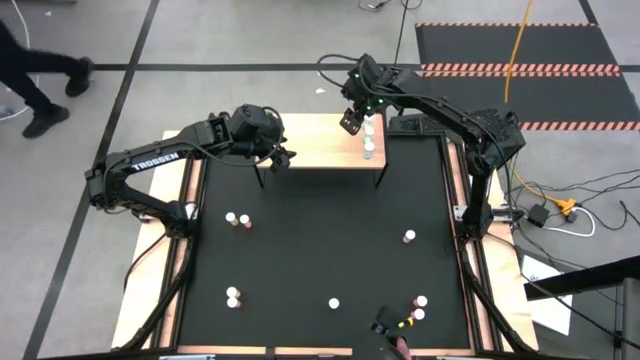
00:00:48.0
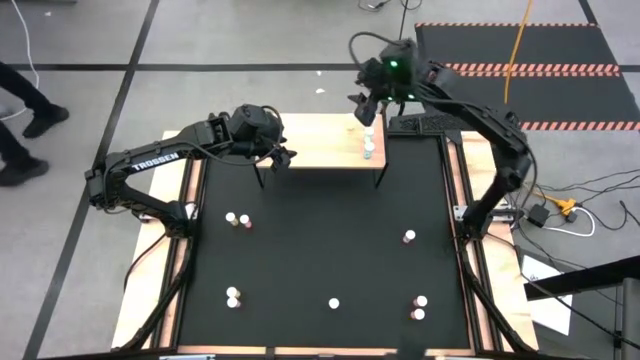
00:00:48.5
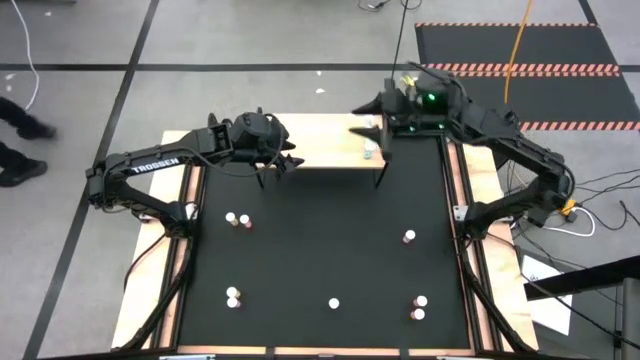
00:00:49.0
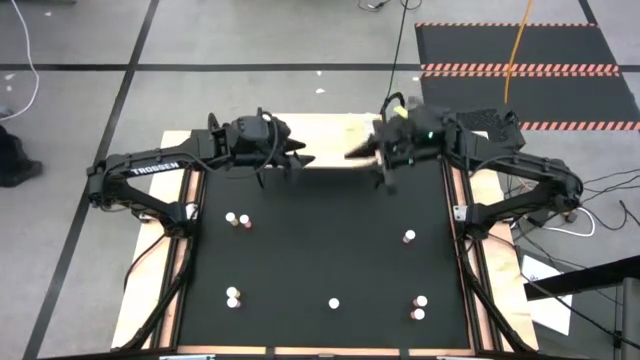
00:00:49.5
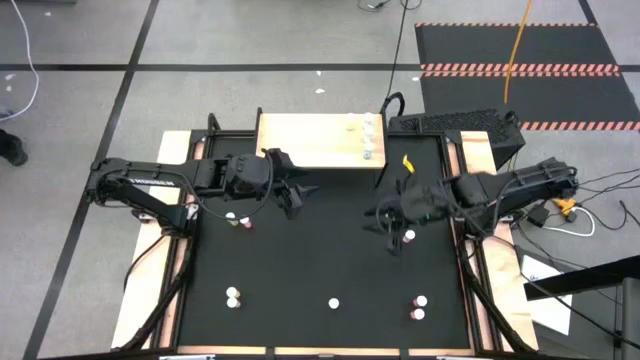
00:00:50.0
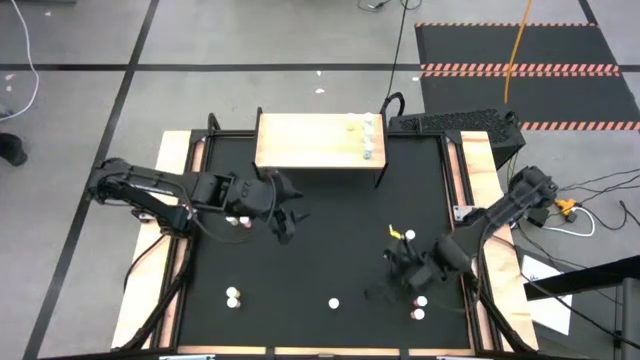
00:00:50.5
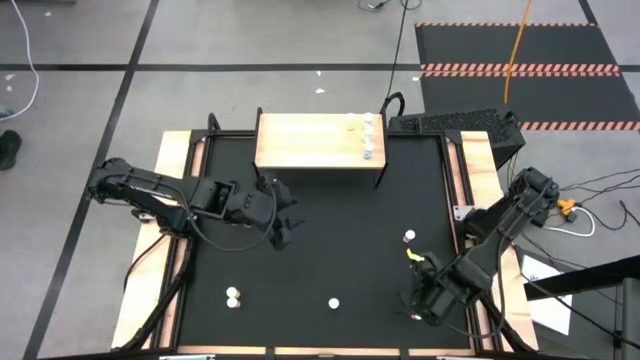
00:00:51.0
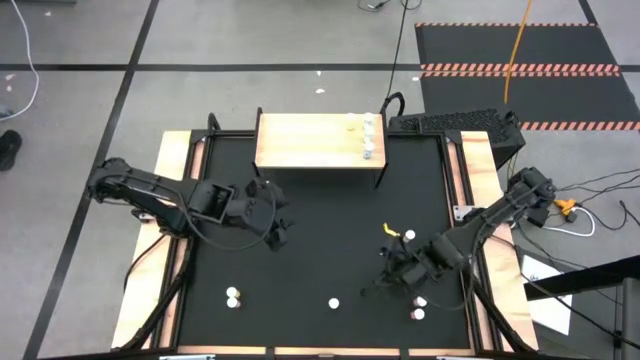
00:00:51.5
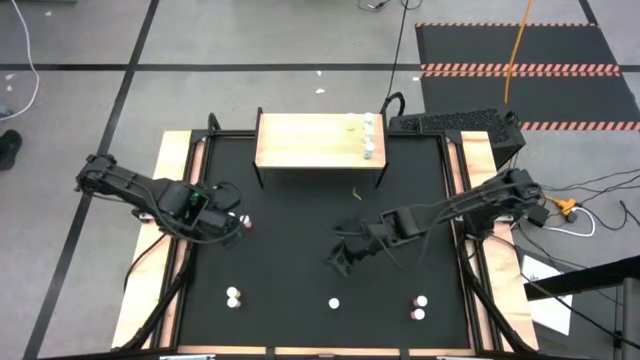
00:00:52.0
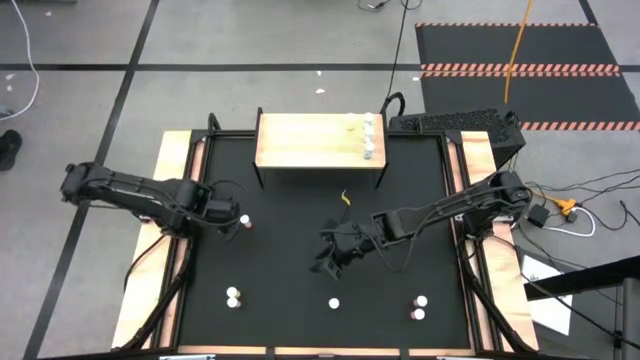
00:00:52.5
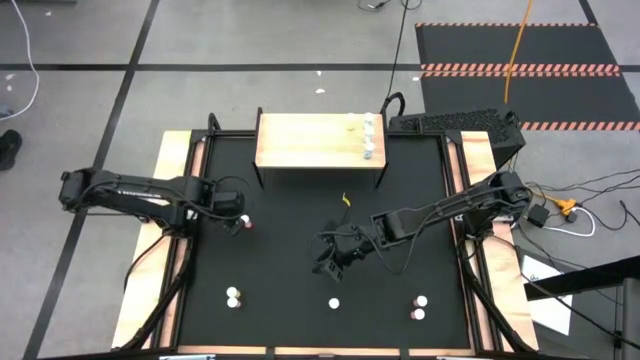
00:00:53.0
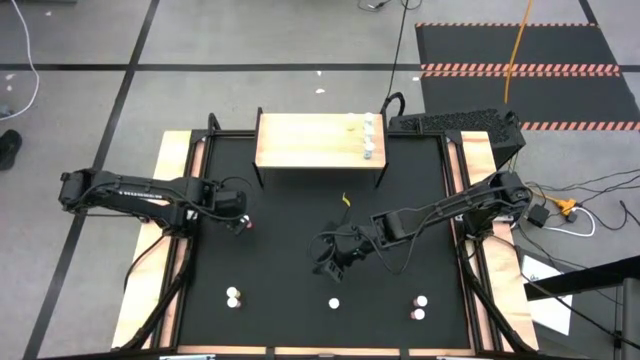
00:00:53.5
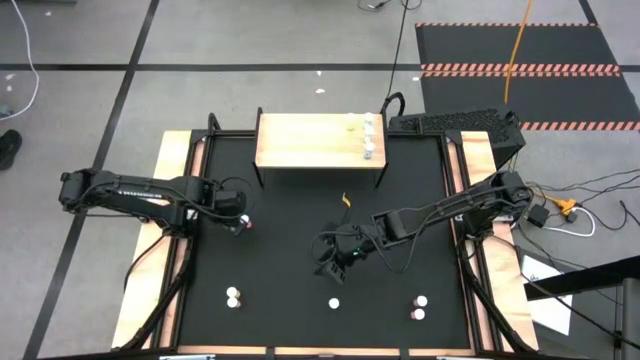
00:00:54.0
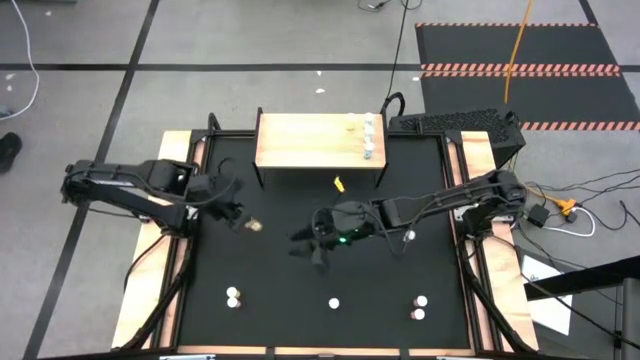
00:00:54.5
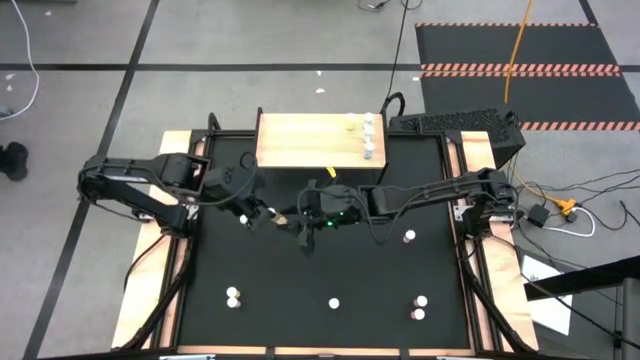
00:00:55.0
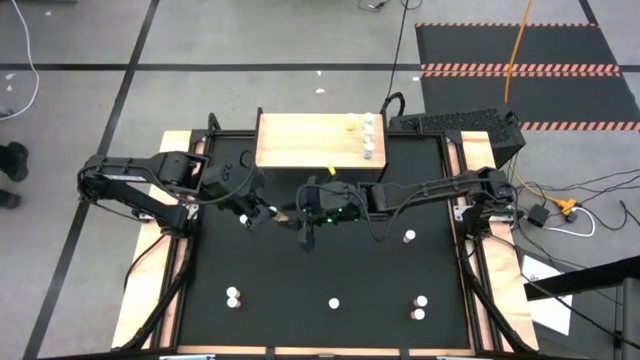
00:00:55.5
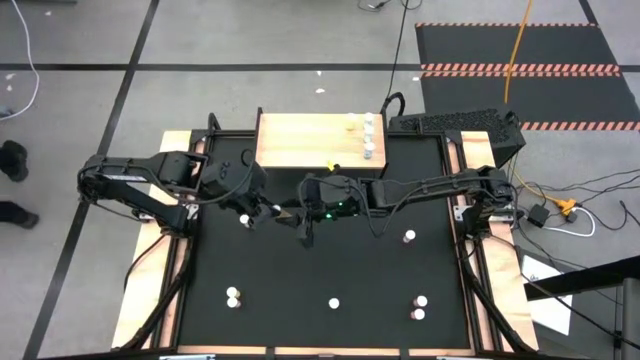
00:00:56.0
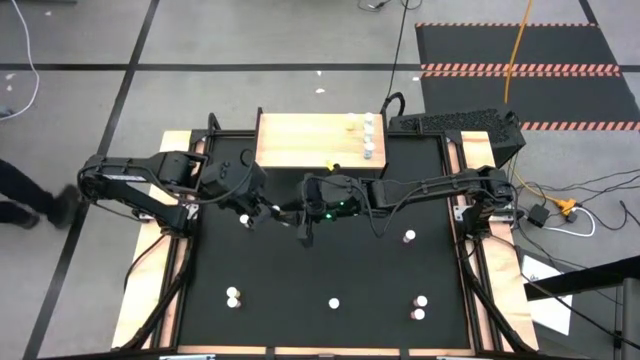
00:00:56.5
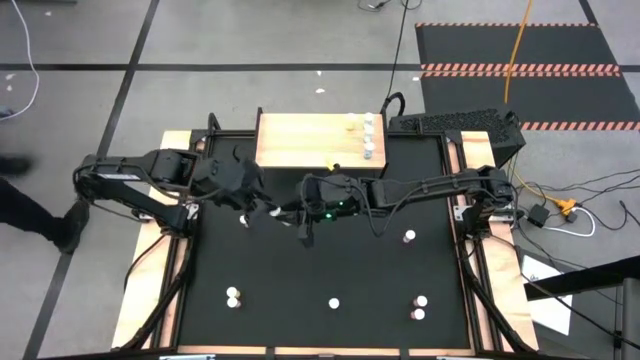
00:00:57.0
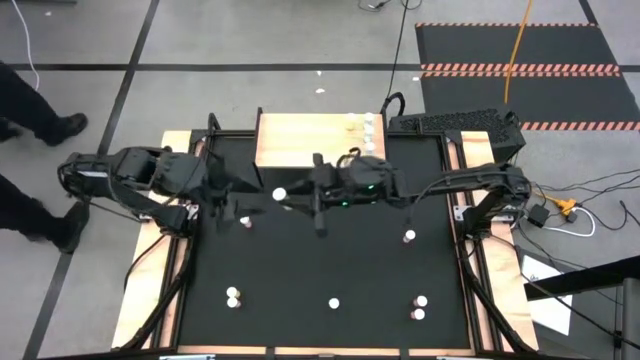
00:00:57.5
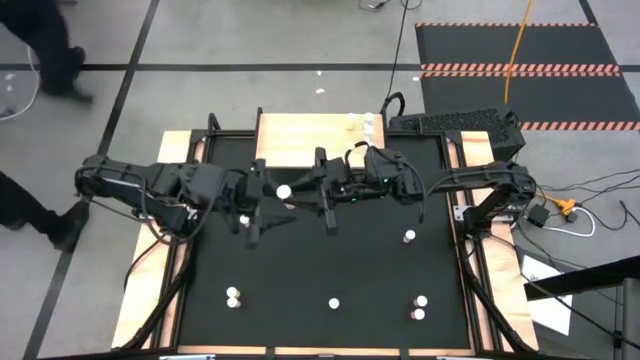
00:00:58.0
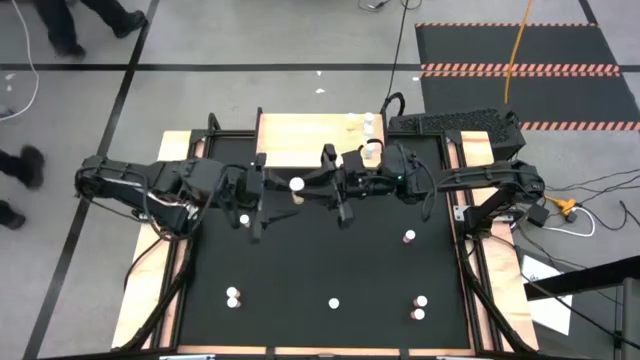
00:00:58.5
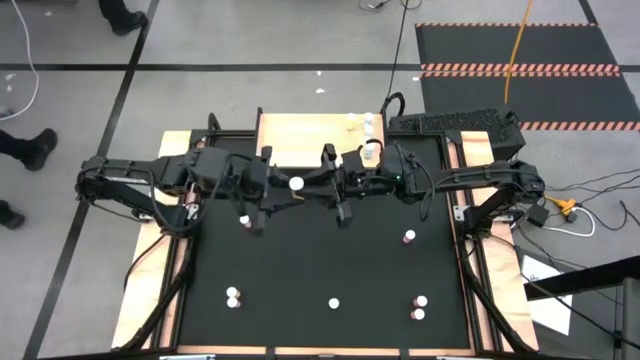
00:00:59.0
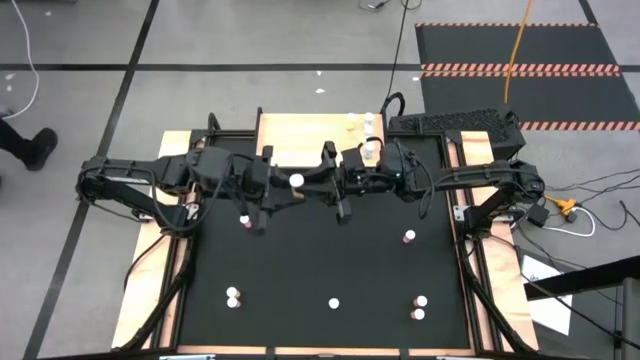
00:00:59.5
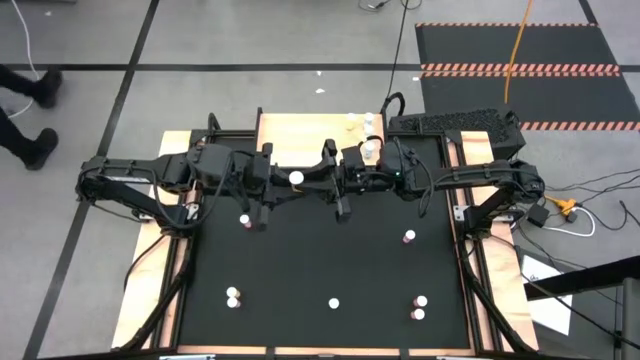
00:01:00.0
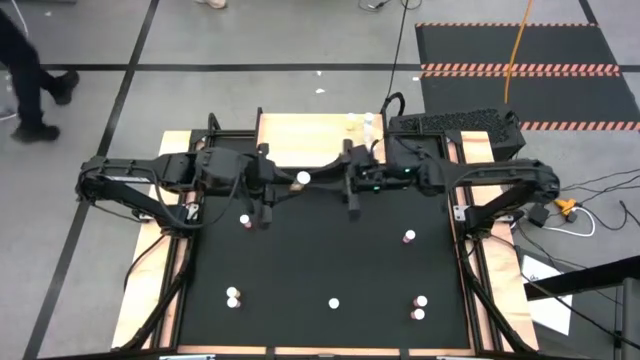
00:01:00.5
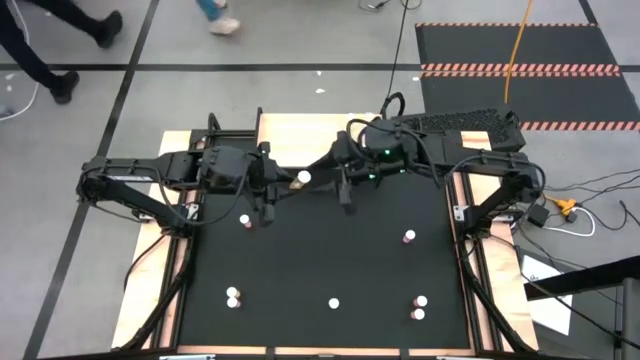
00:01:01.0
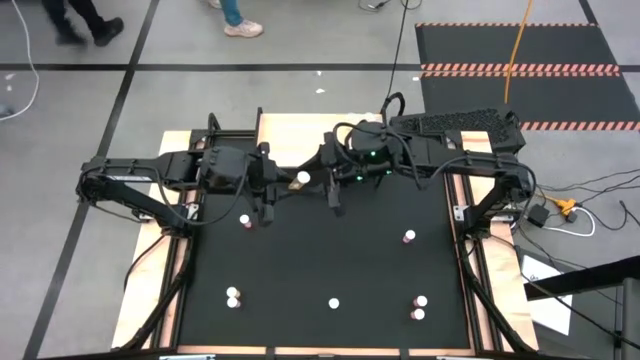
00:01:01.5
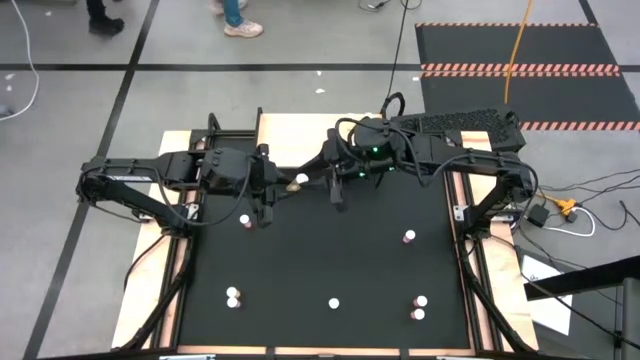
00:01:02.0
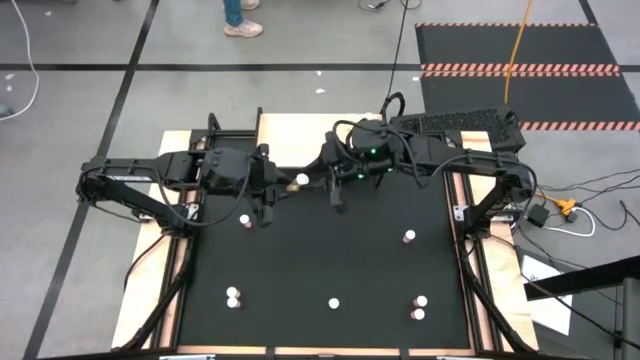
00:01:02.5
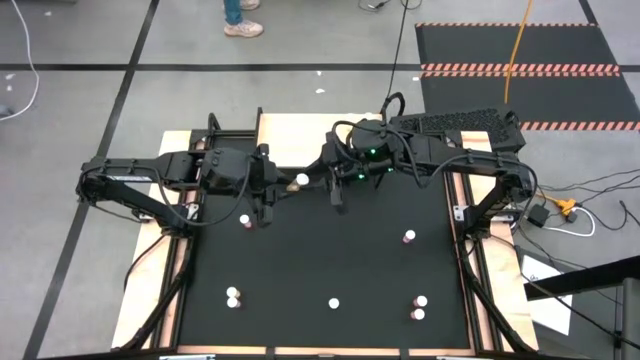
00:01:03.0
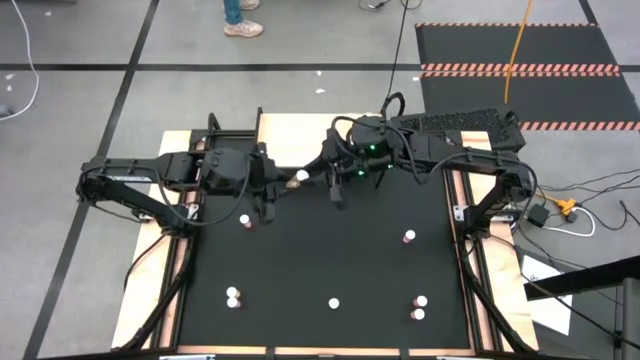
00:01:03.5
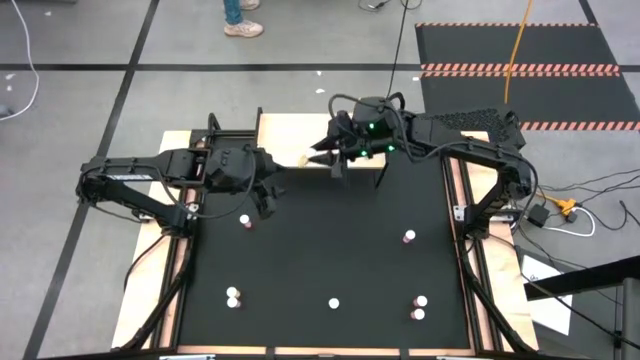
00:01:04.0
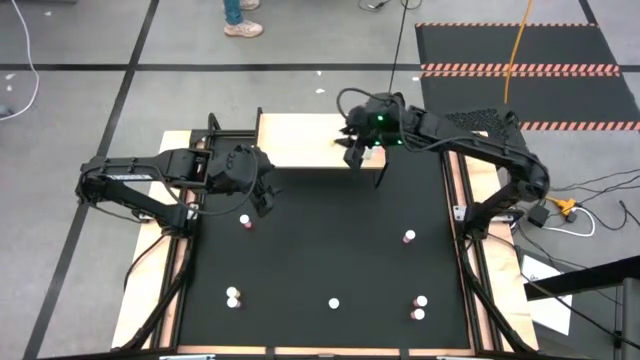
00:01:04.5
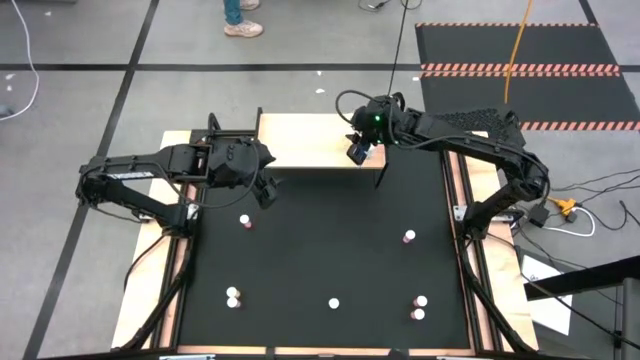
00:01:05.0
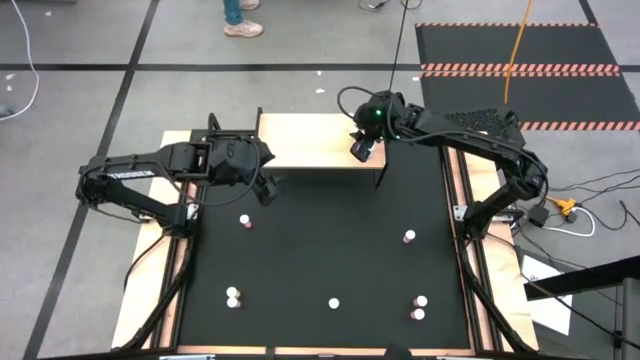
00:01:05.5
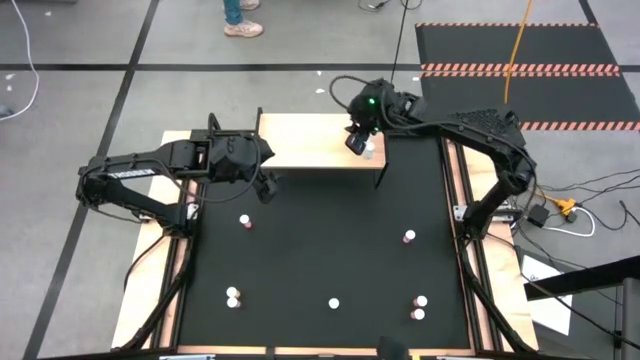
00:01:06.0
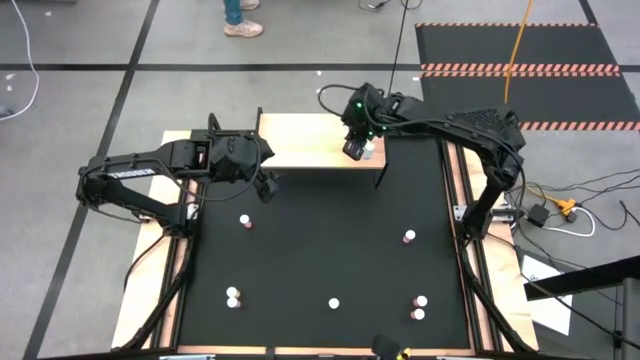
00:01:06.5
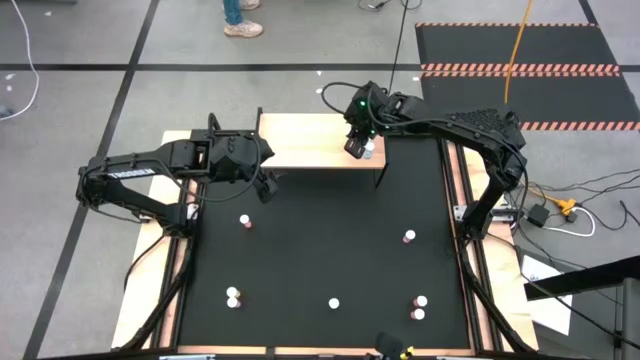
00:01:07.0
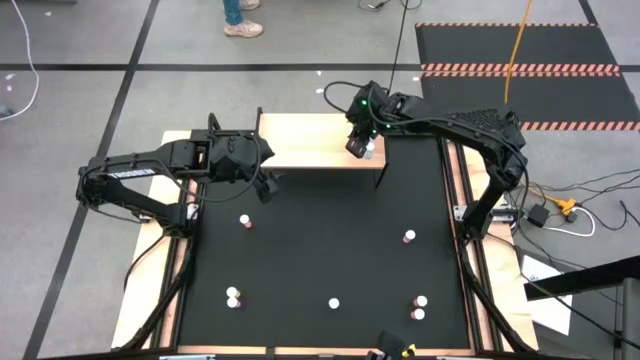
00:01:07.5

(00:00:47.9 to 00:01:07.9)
Task: Pick and place medicine bottles onto shelf by color
Put the top yellow pill bottle on the shelf aligned with the other yellow pill bottle
